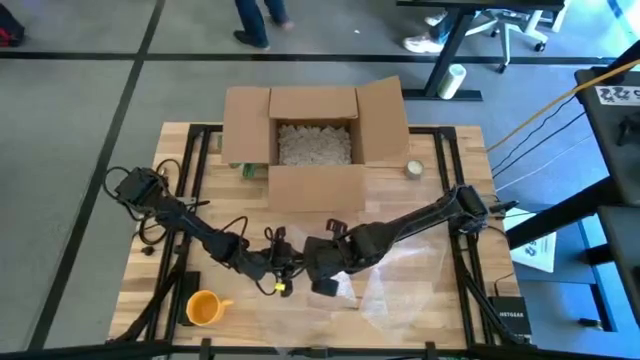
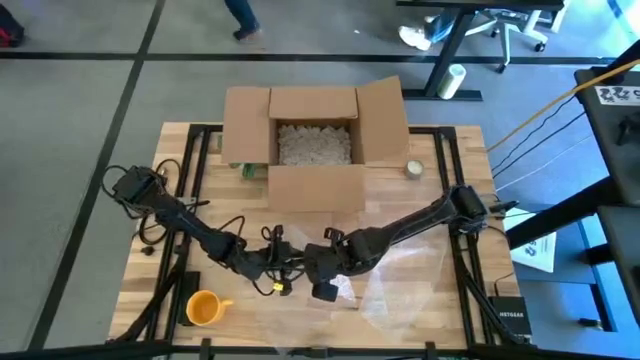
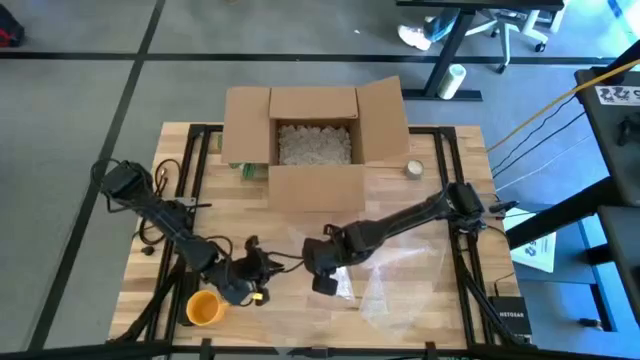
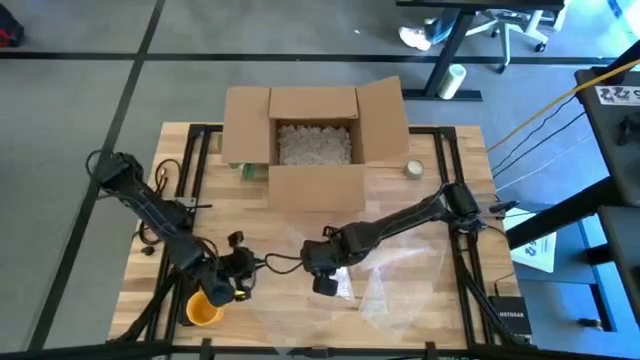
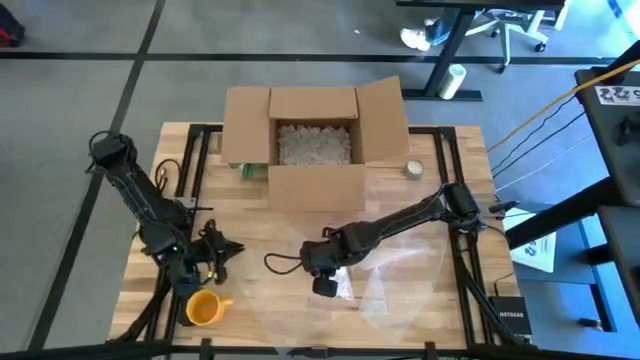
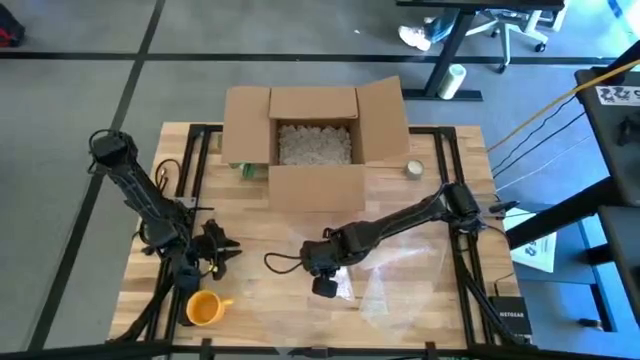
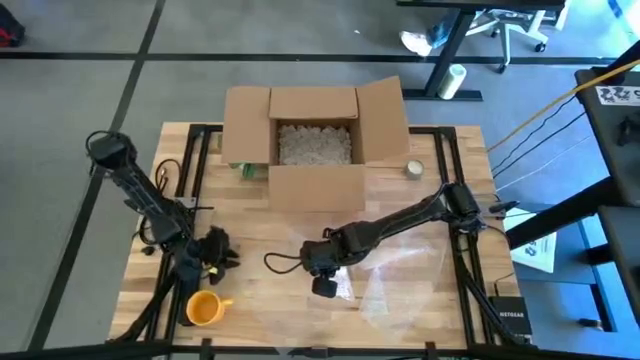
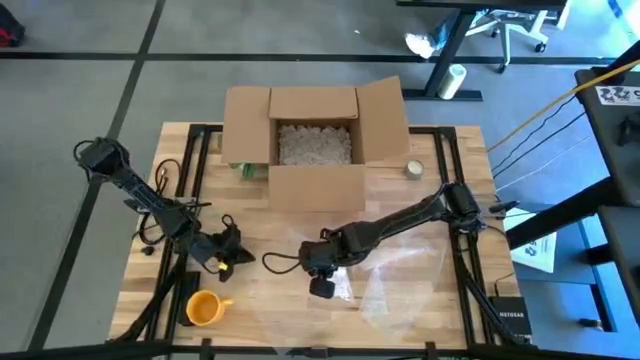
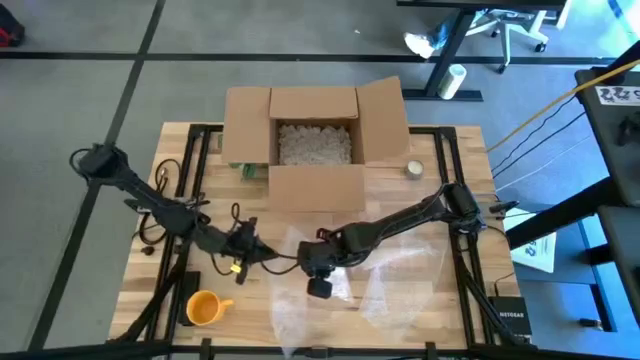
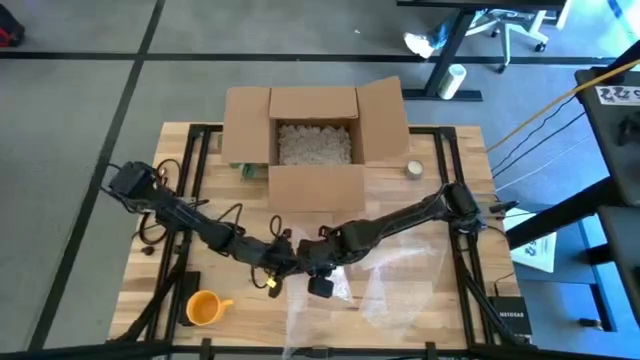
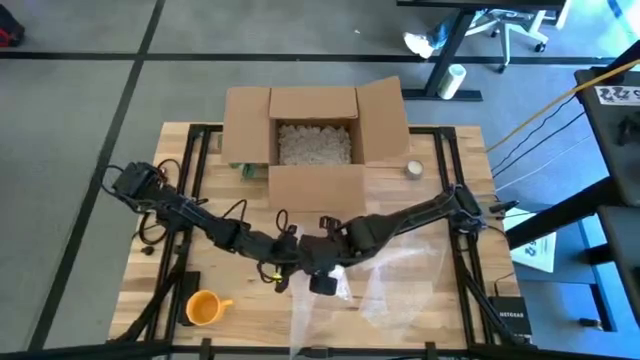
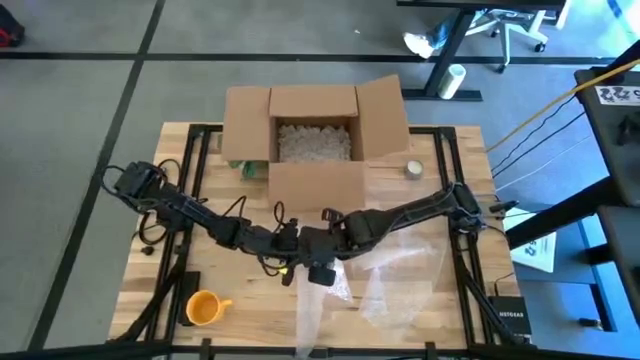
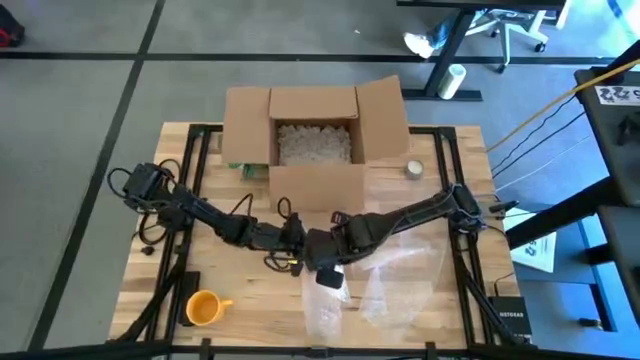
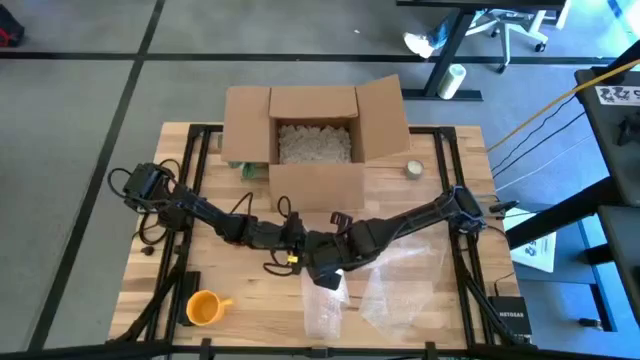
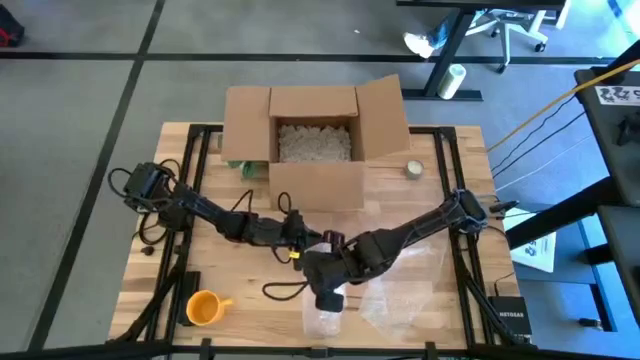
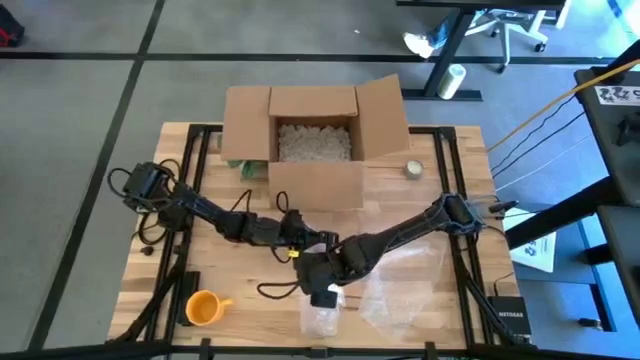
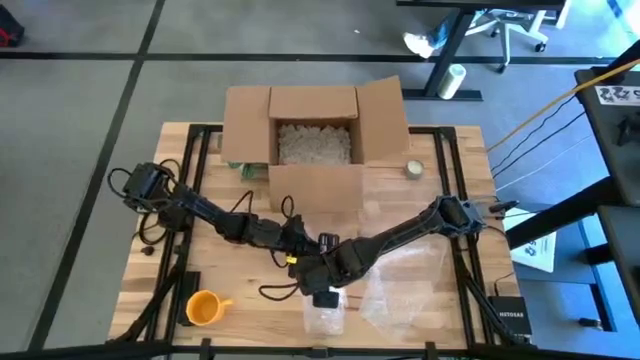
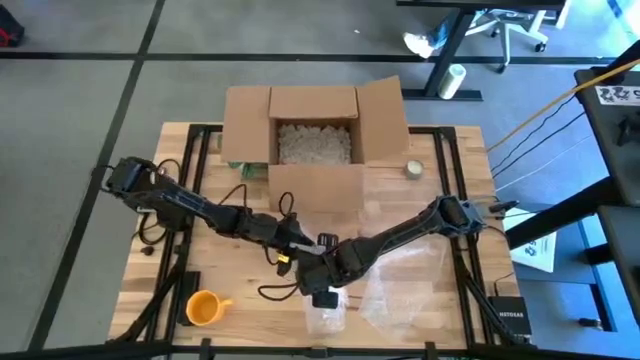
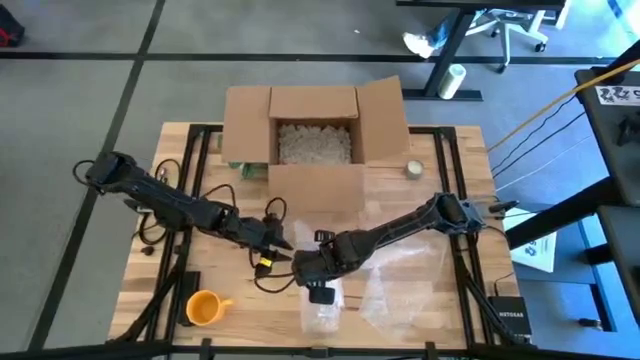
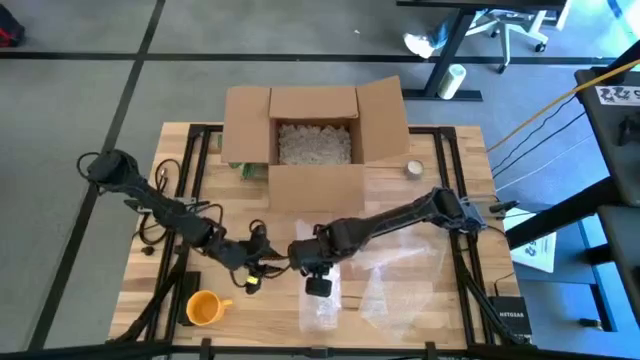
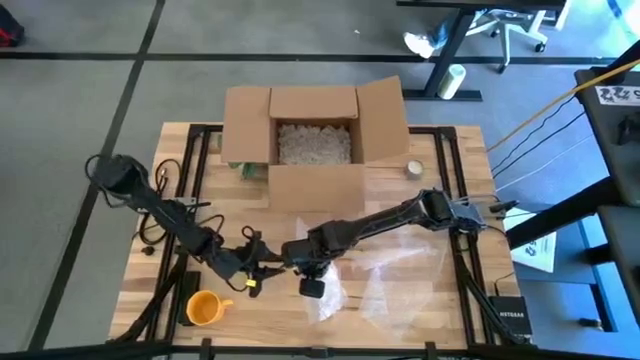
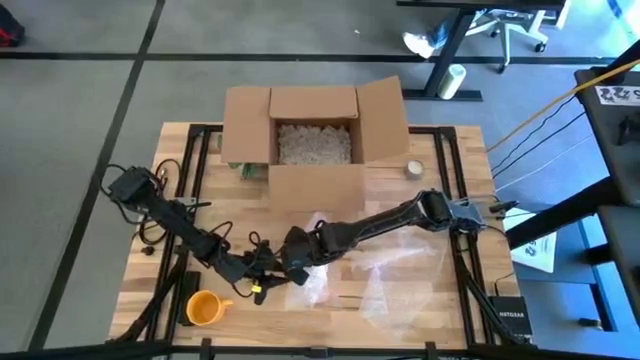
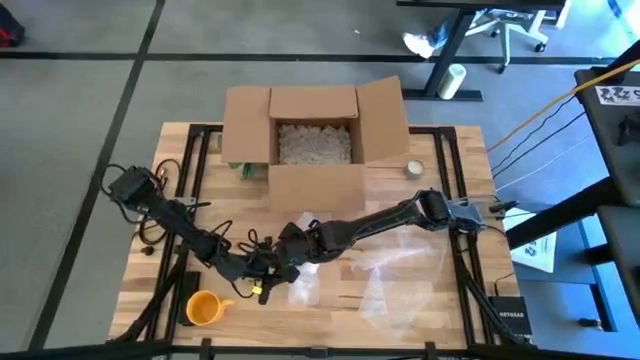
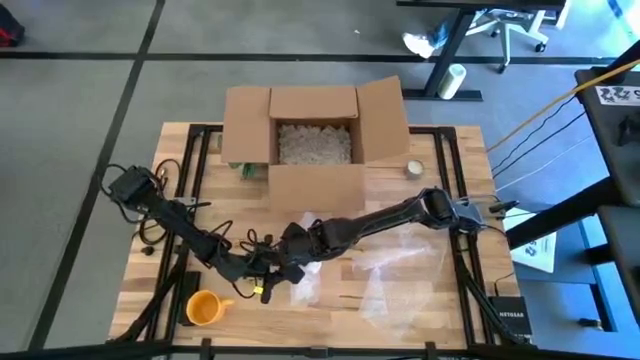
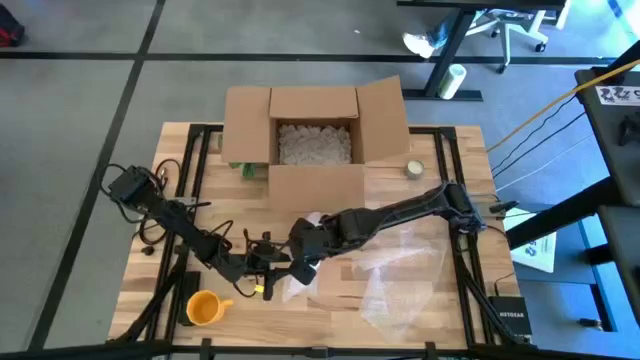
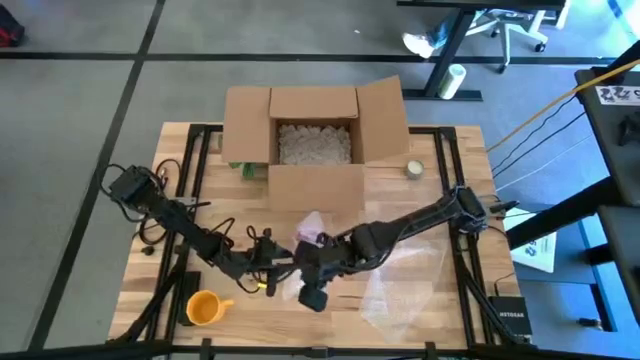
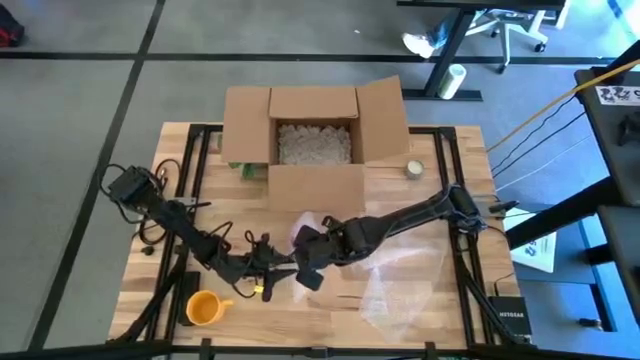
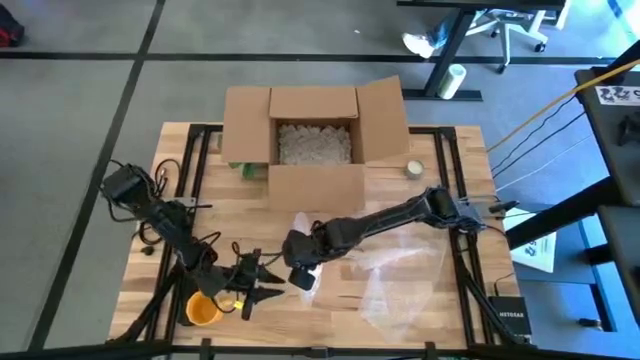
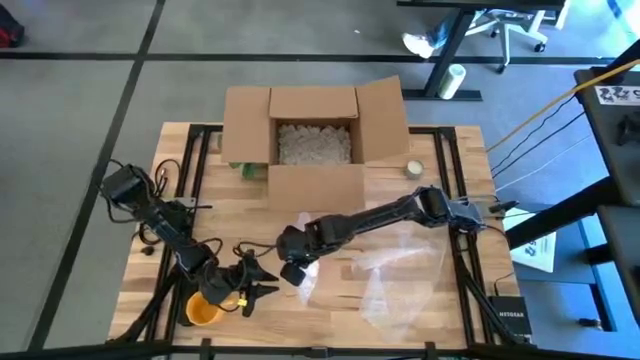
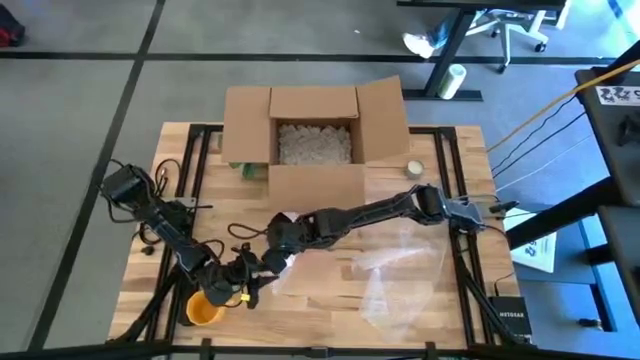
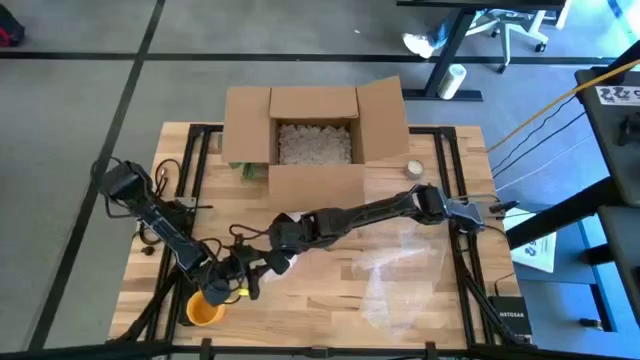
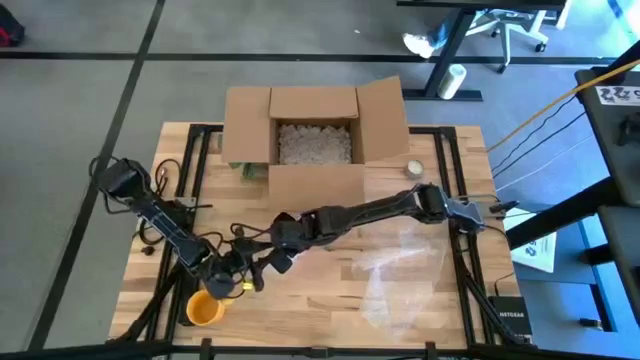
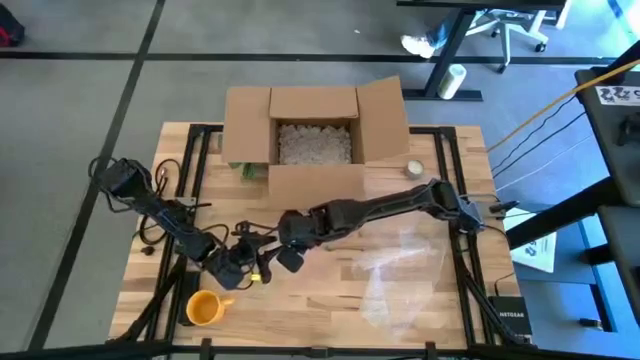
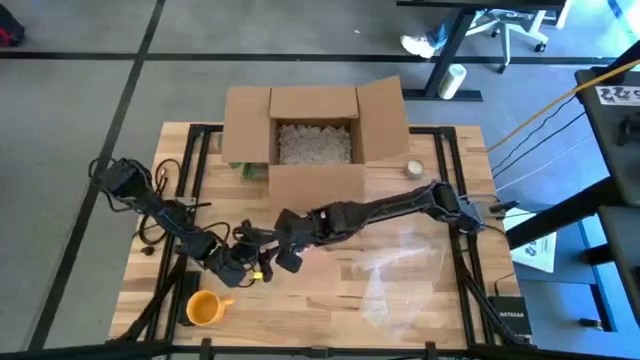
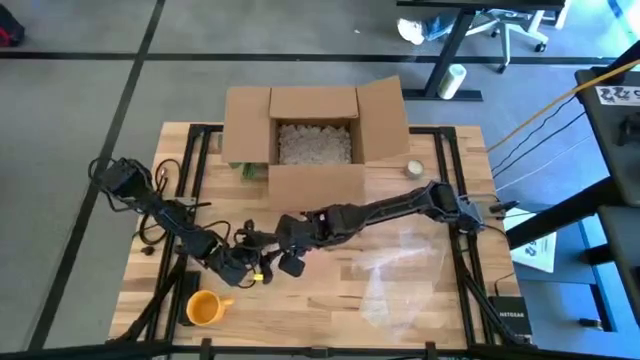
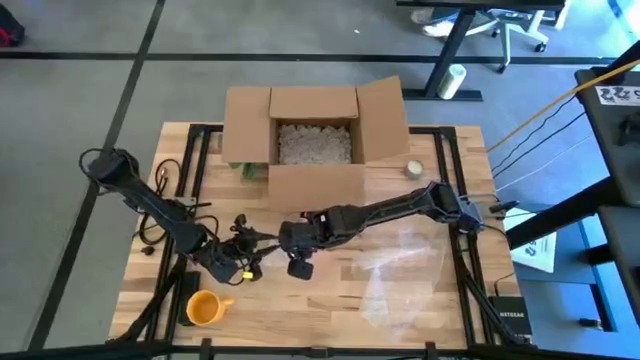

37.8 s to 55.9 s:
Task: wrap mug
Wrap the red mug with bubble wrap

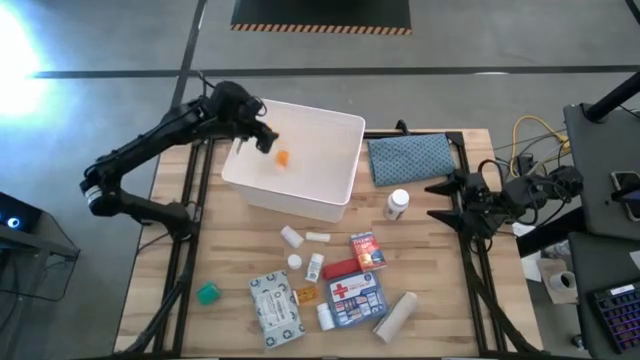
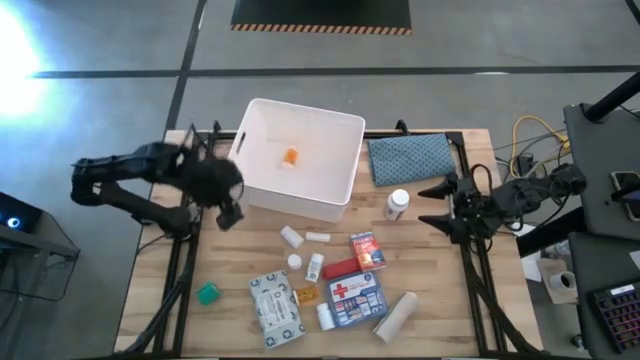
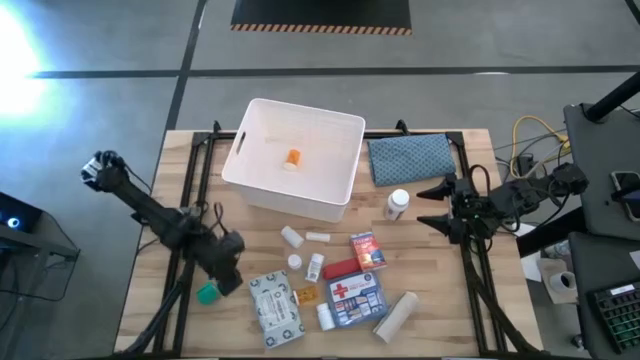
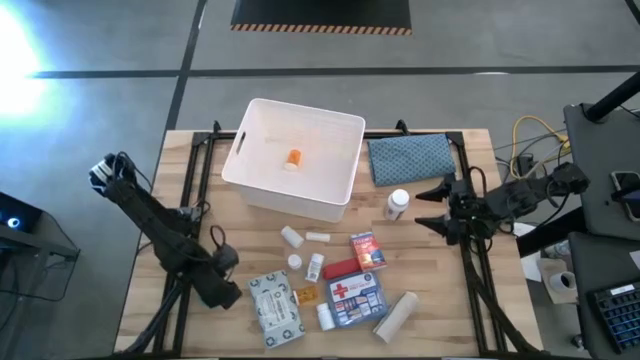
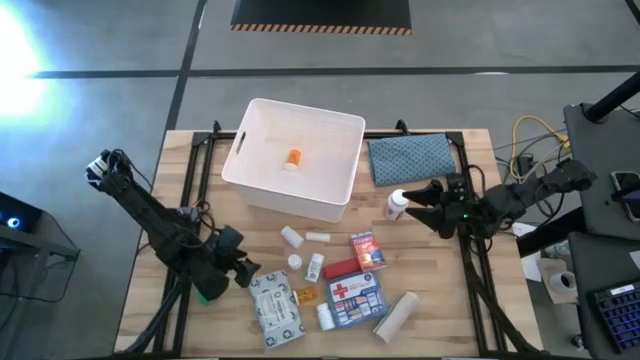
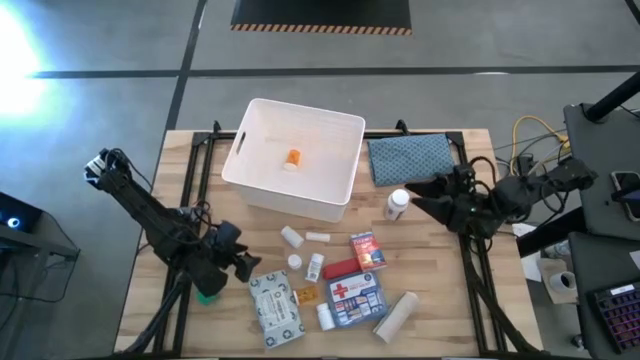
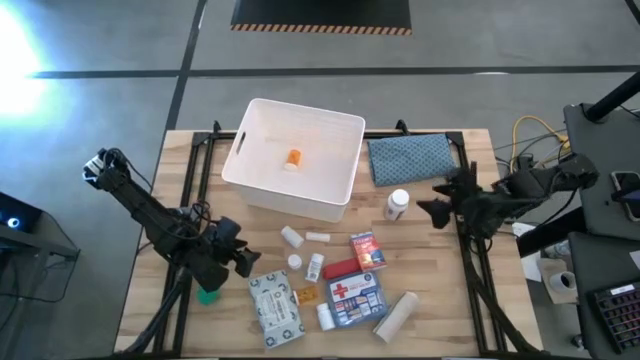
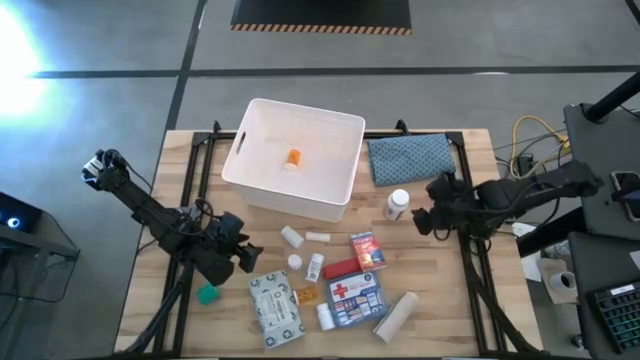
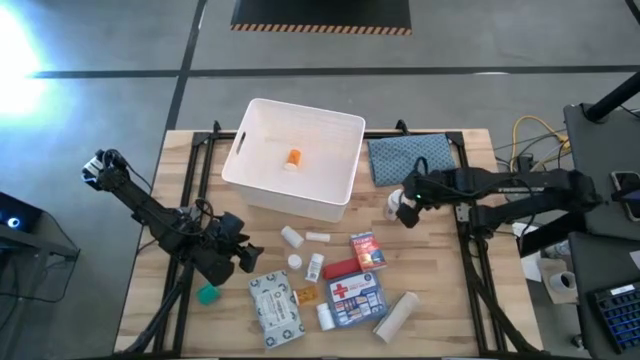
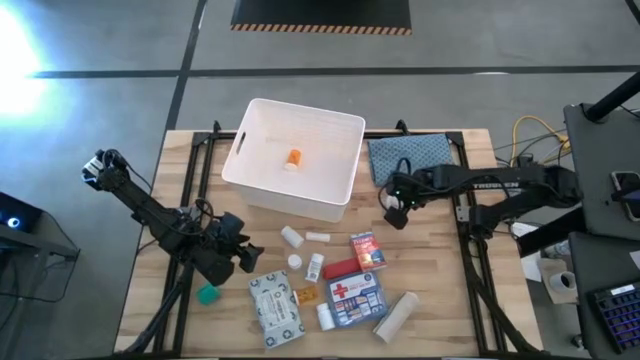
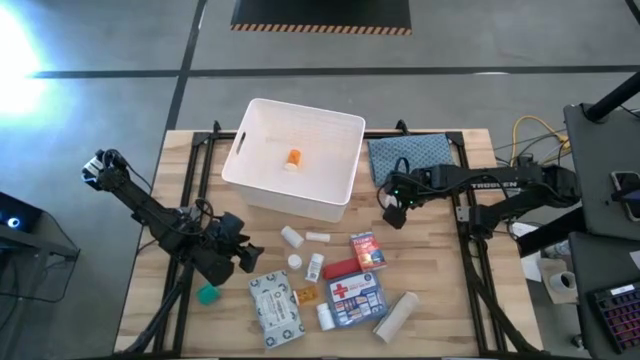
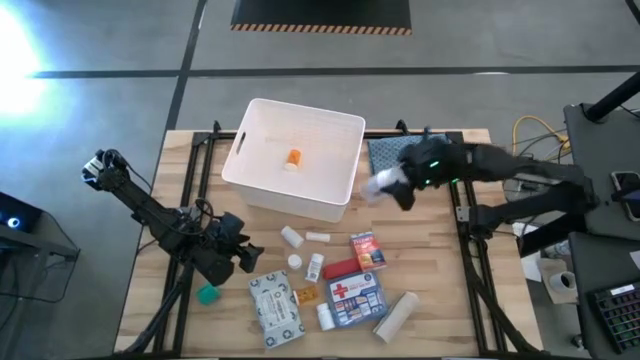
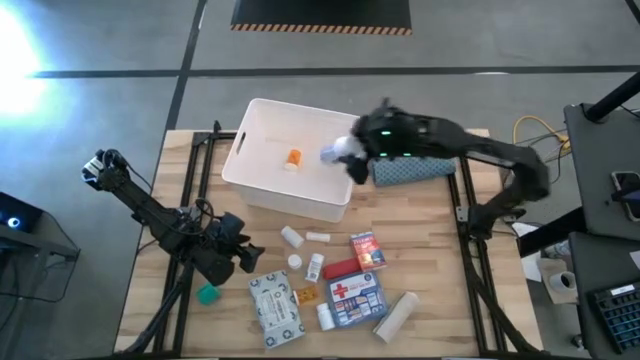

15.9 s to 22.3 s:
Task: Pick & place medical supplies in basket/bin
Put the large white pill bottle into the white bin
